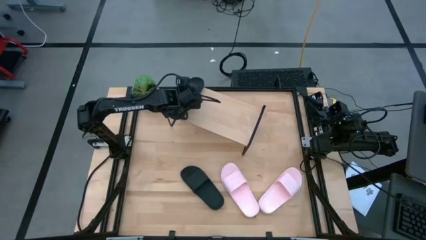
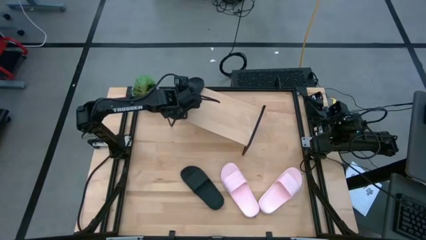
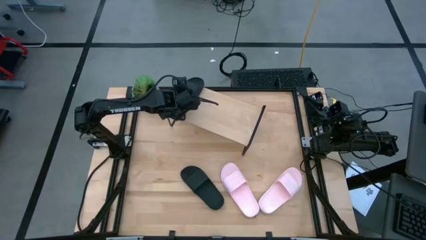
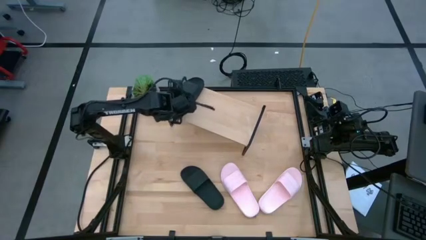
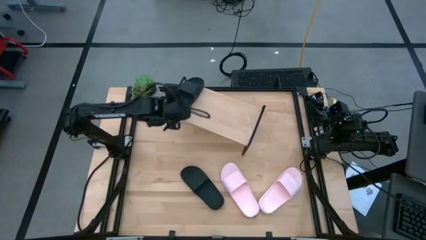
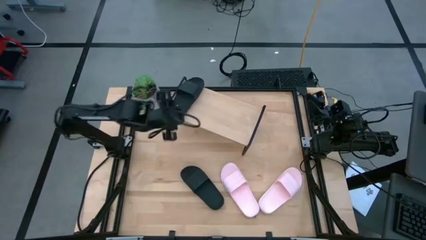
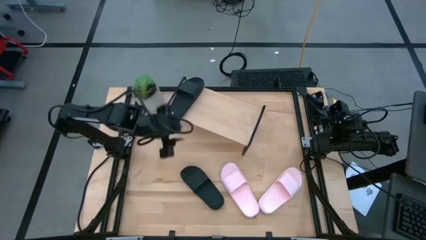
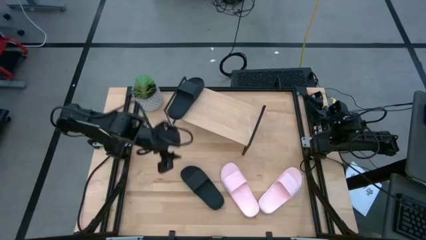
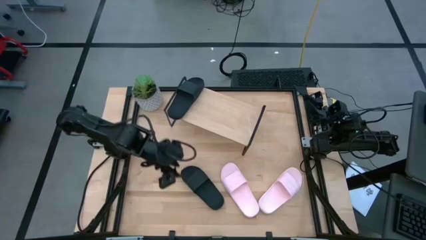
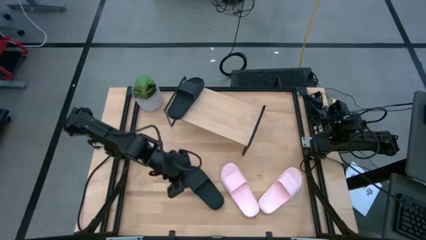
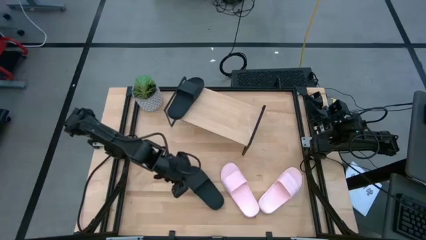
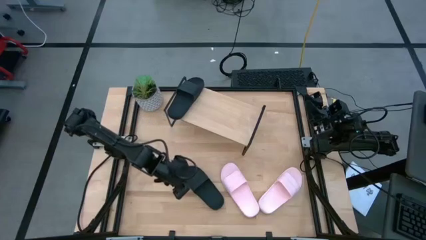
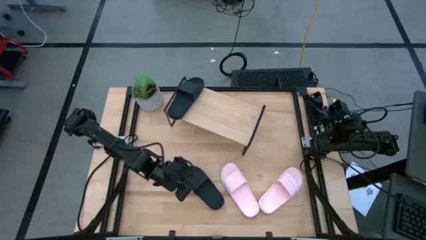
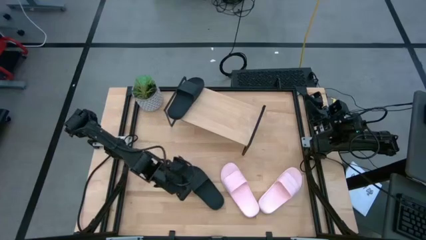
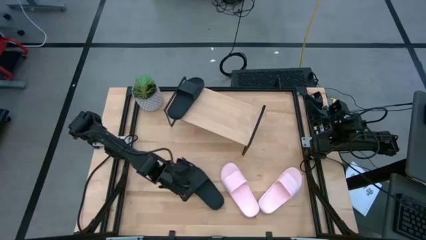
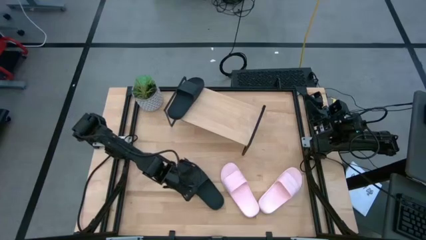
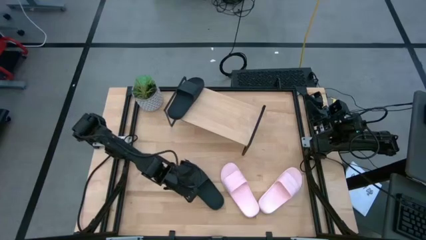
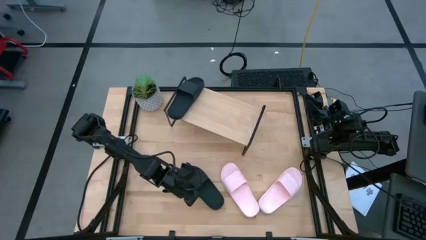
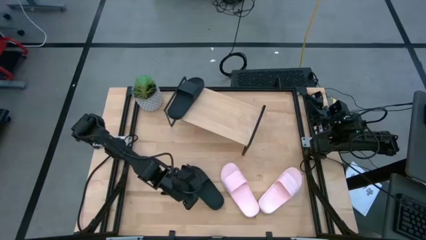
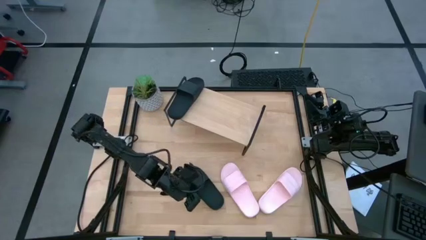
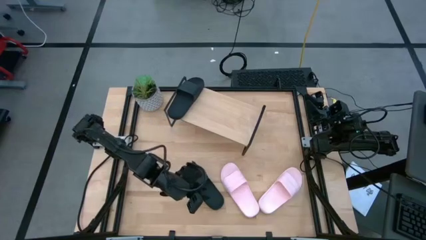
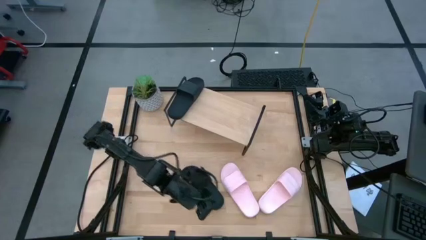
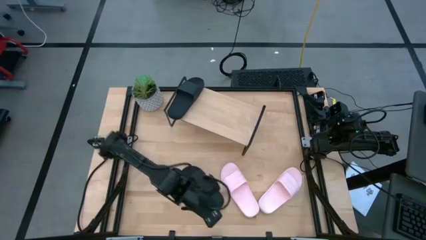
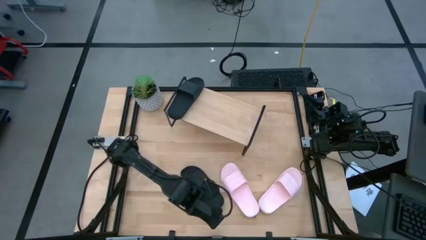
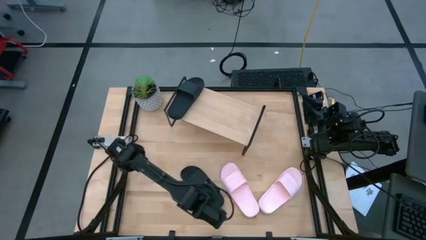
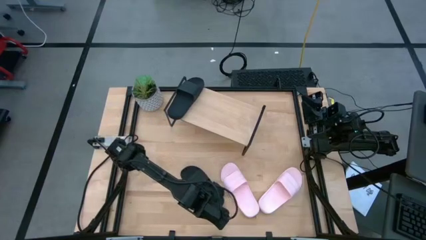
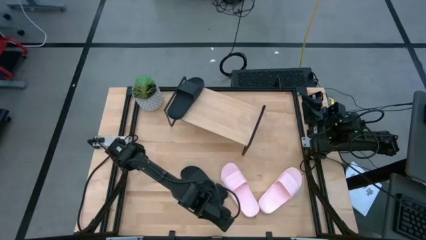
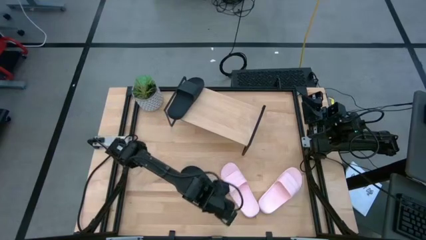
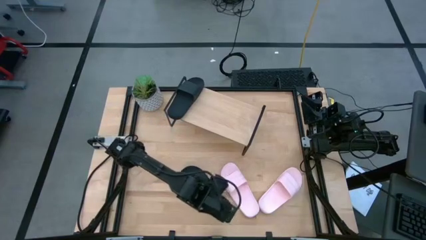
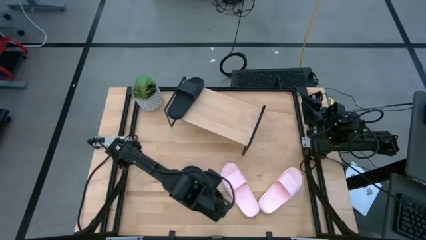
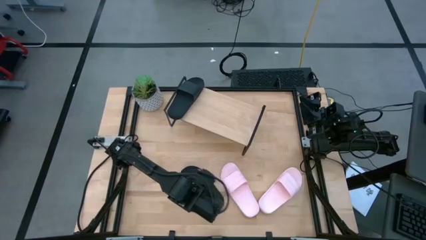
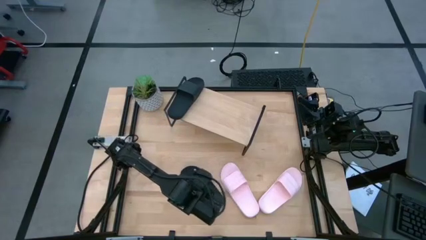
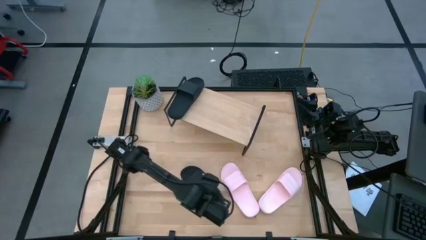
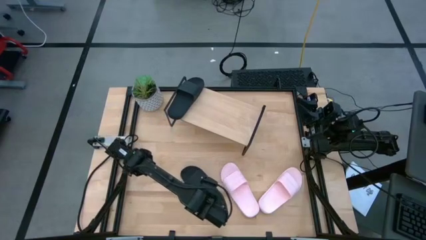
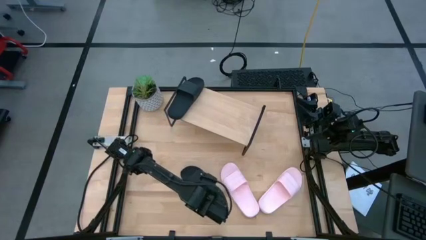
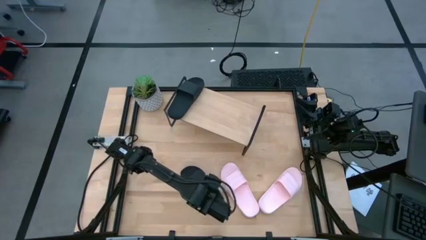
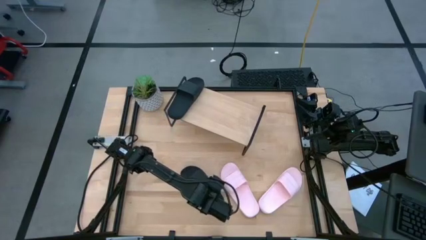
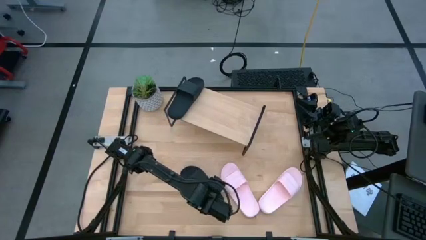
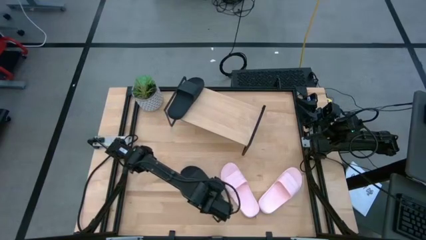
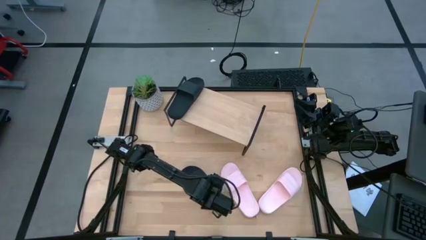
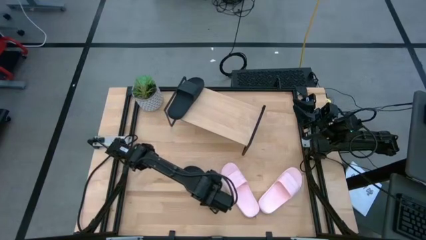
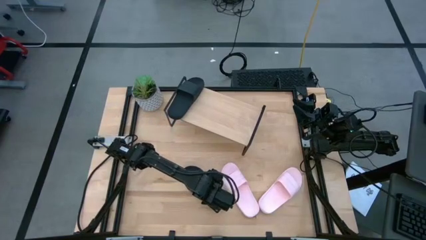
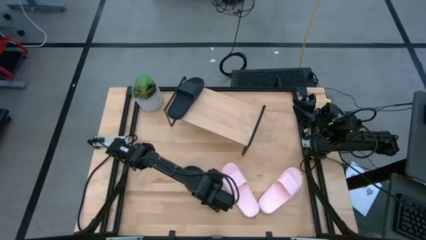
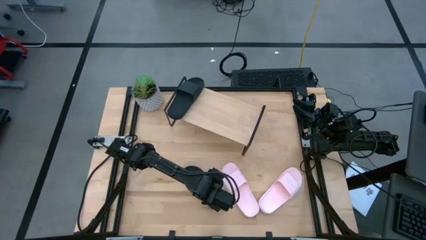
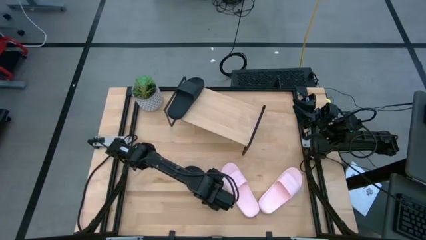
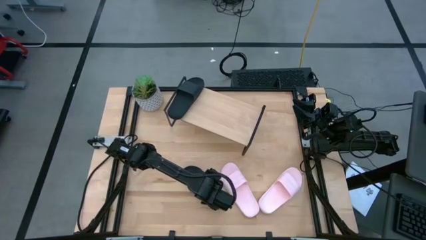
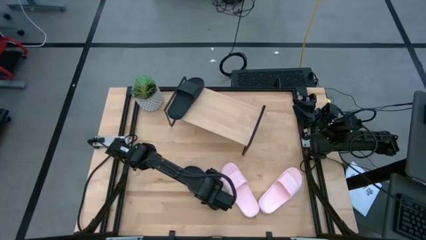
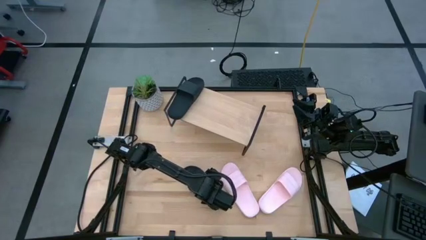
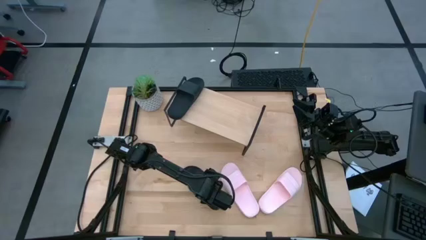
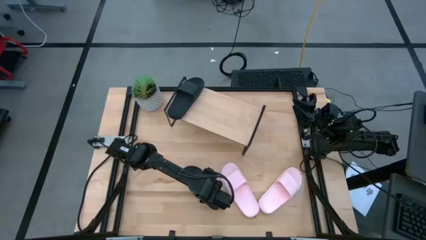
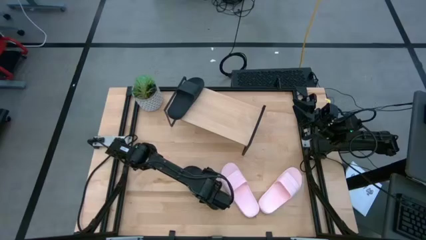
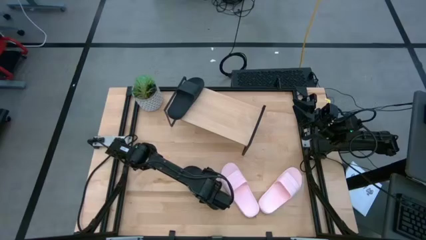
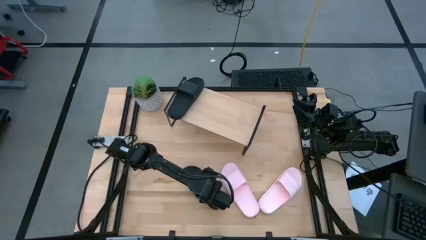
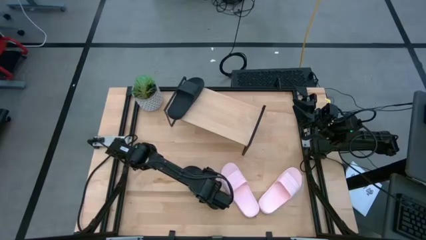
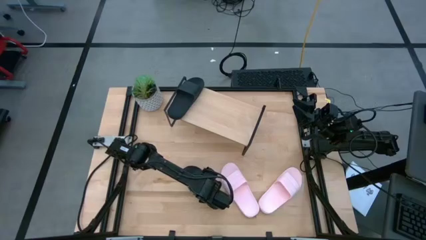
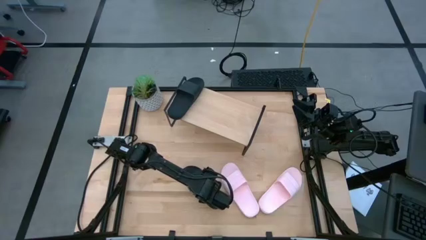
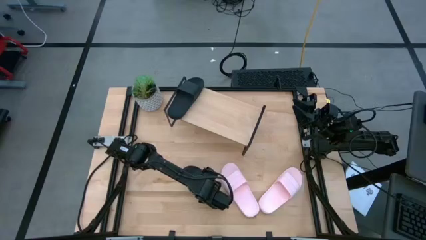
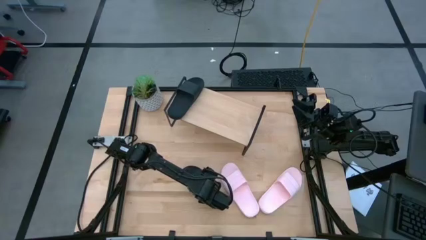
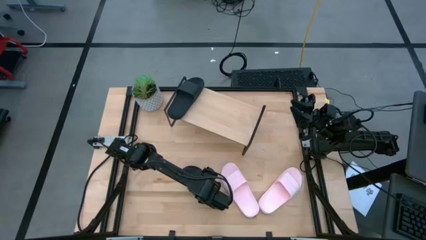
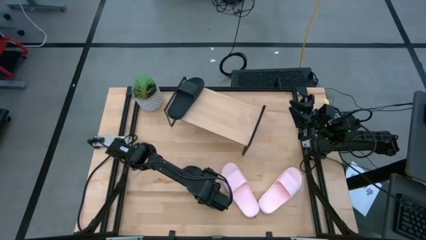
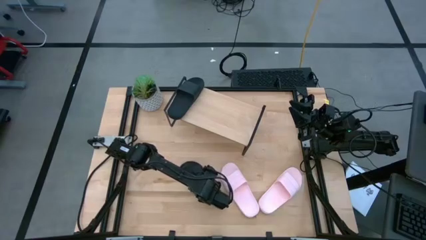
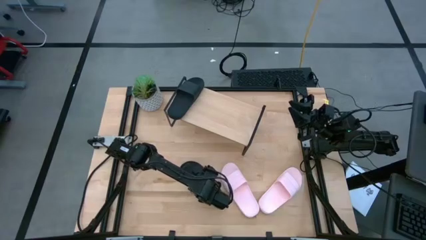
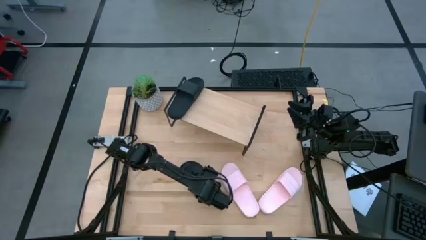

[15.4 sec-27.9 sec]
Task: Pick and place slides into the shelf
Put the black slipper on the shelf
